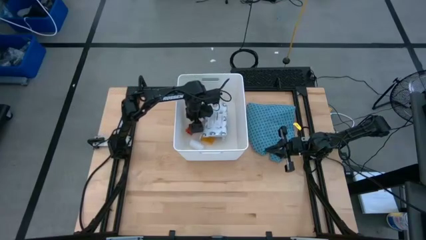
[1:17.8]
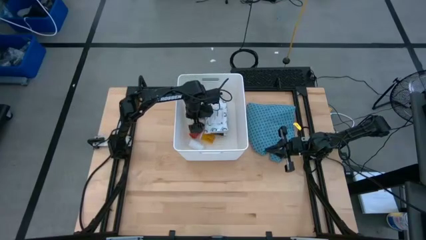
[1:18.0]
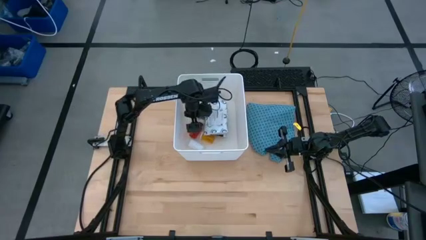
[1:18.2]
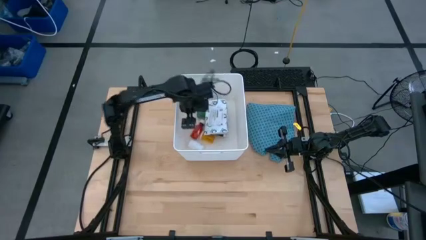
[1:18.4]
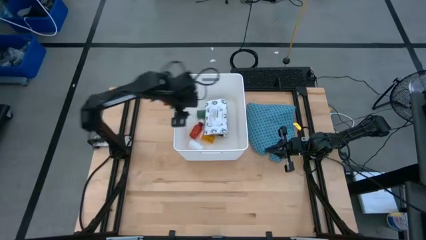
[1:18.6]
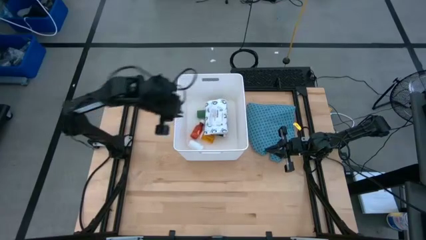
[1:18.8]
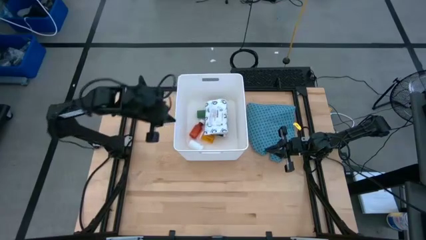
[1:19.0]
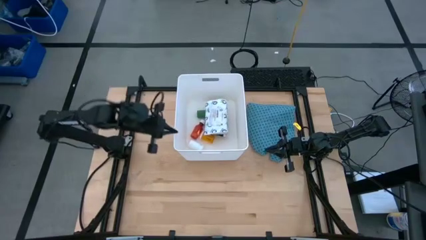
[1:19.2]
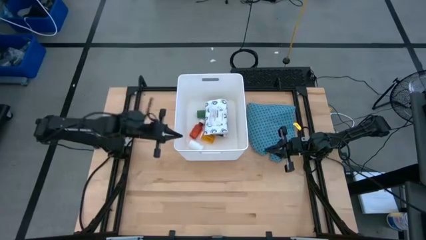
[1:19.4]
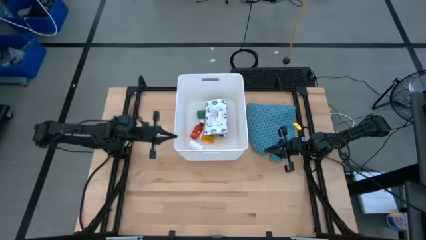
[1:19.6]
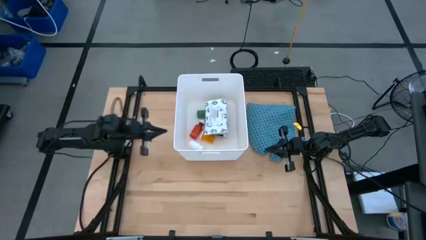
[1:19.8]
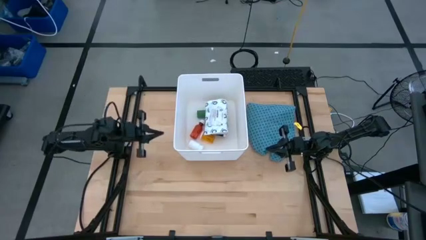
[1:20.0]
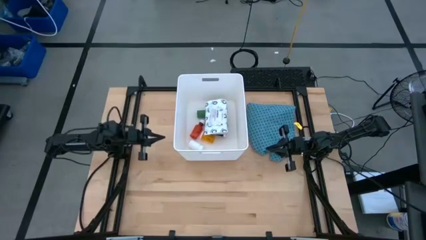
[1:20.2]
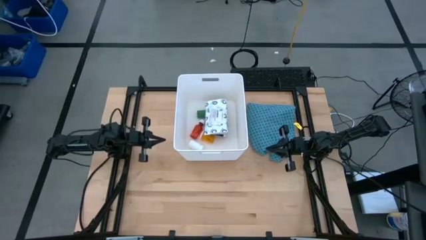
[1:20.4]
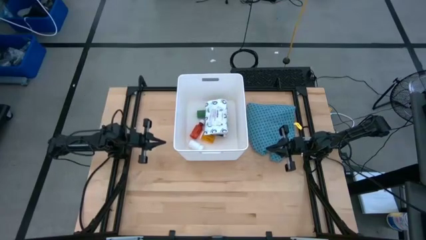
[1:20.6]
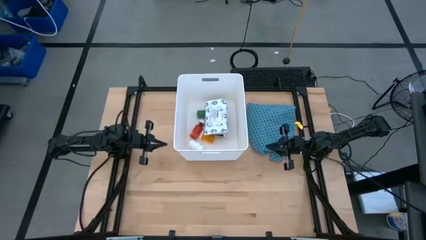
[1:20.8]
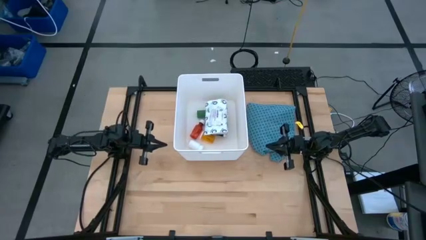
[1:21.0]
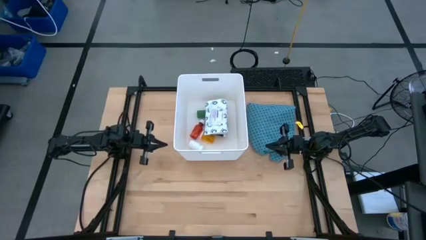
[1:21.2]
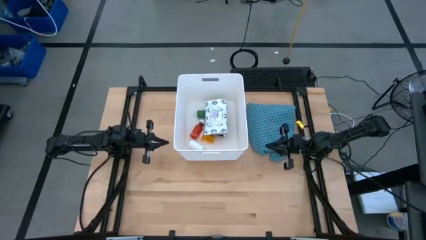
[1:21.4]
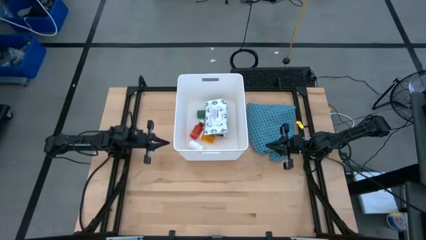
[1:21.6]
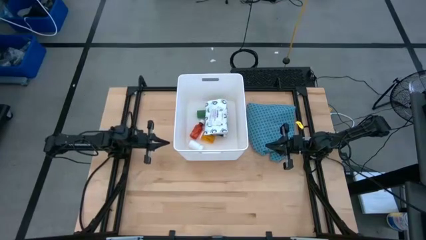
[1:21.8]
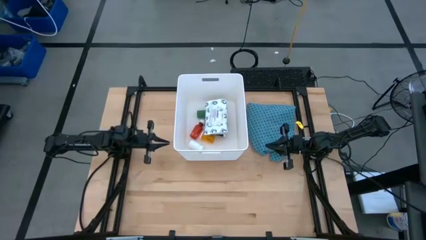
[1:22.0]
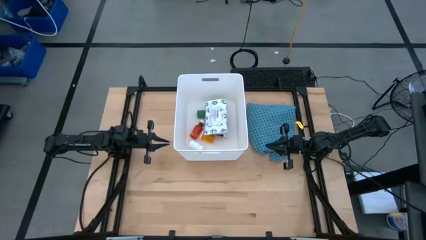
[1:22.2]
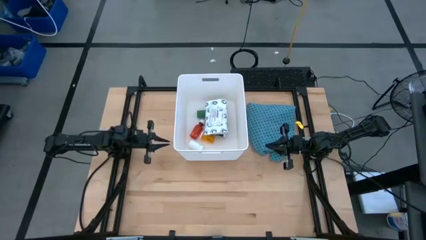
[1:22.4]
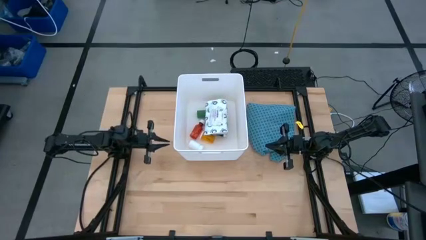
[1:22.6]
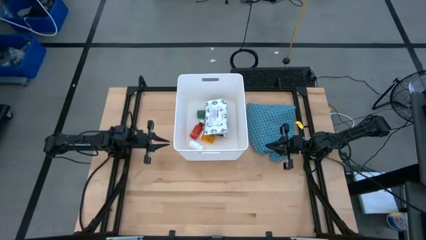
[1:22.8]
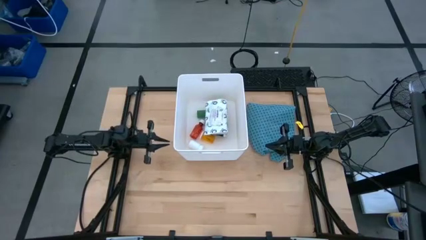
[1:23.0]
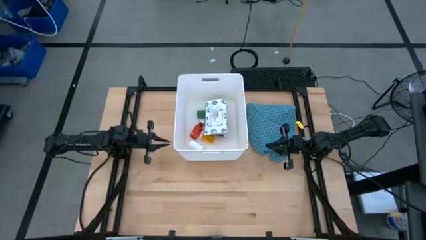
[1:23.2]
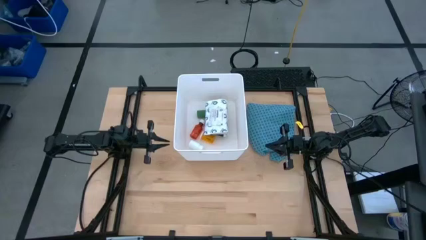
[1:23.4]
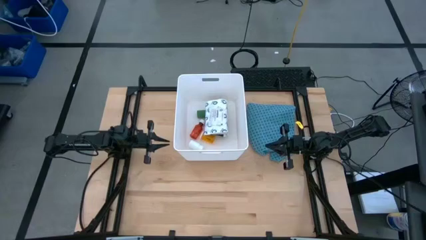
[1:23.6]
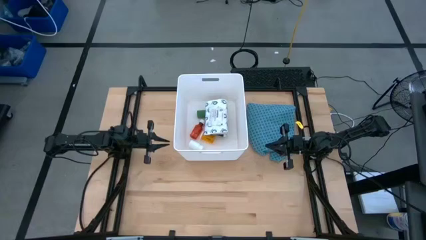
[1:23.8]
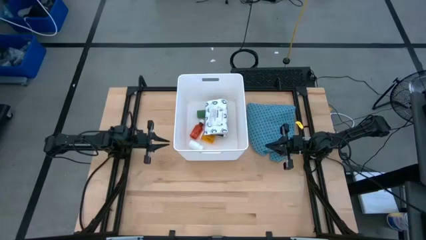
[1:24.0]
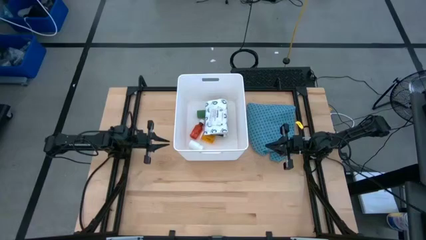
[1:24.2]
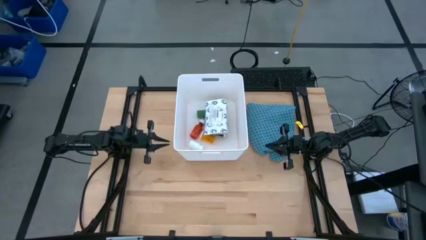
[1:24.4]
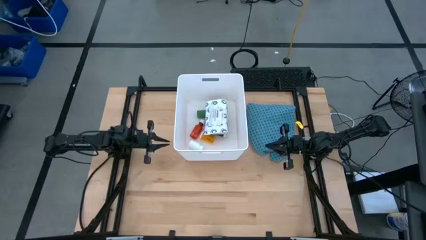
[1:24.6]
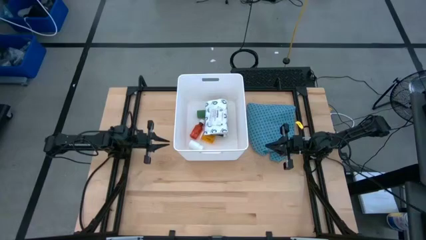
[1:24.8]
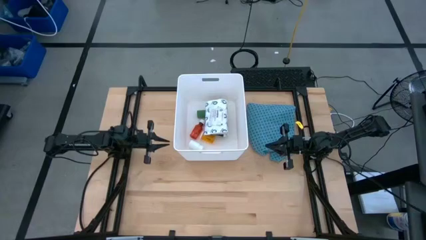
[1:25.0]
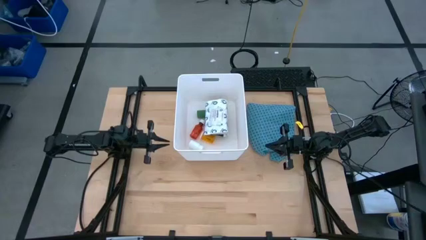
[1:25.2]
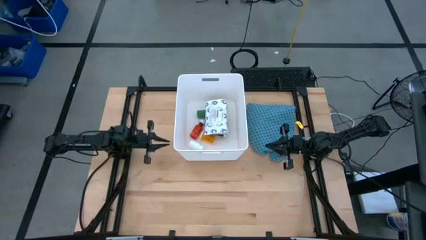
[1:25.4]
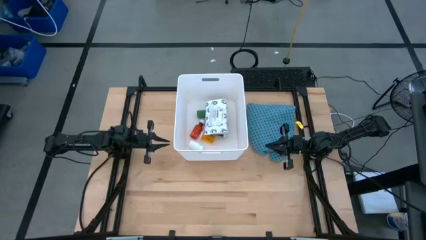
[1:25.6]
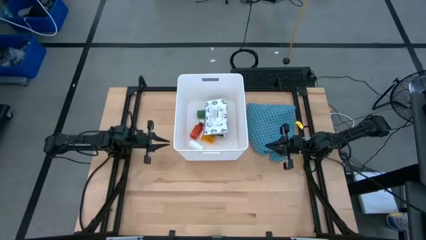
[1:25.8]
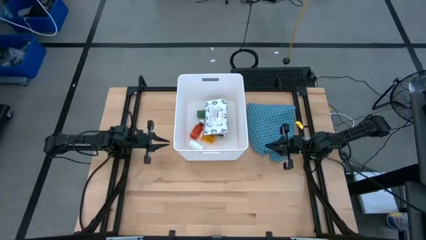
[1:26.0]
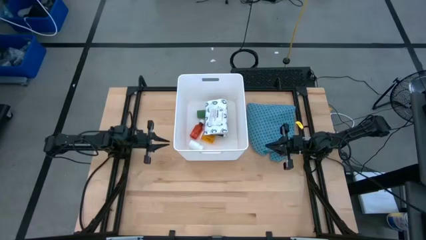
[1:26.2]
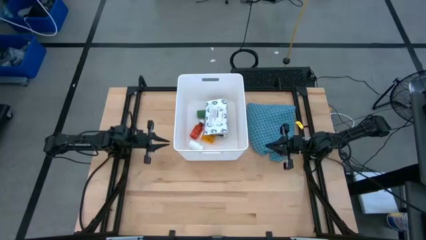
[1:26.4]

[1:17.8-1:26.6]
Task: Pick & place medical supplies in basket/bin
Return to Home Position

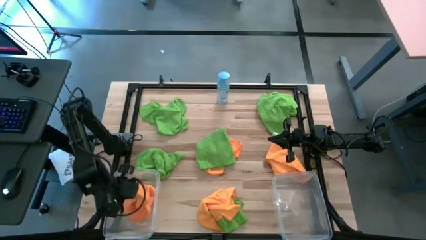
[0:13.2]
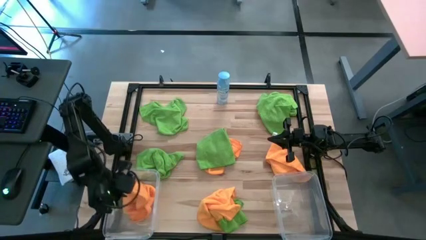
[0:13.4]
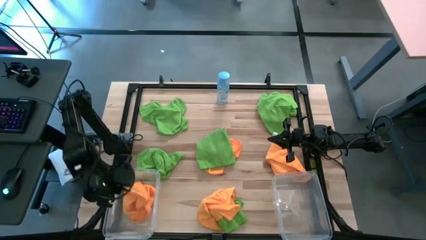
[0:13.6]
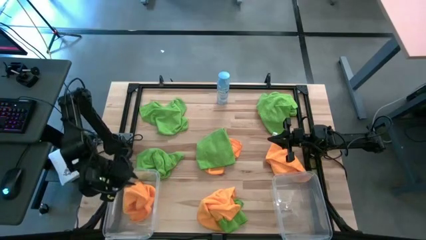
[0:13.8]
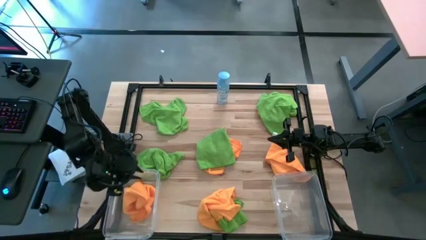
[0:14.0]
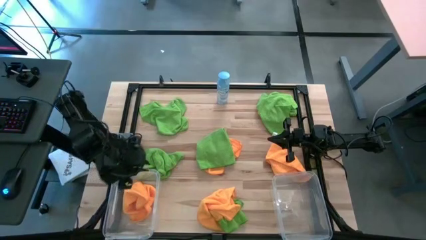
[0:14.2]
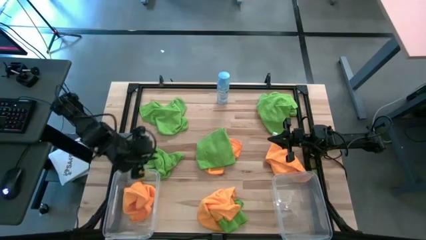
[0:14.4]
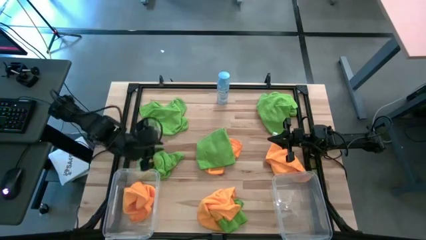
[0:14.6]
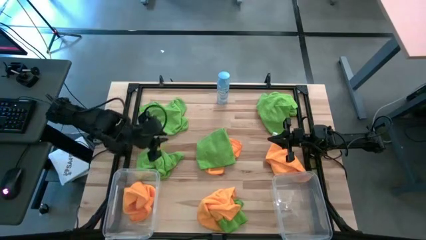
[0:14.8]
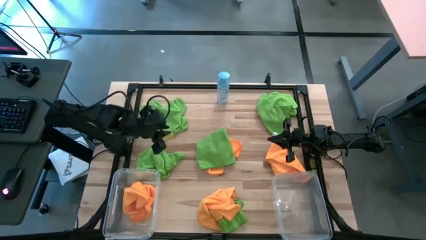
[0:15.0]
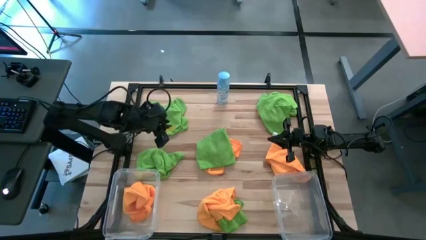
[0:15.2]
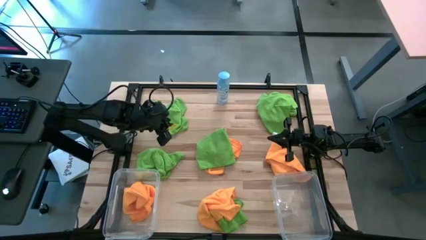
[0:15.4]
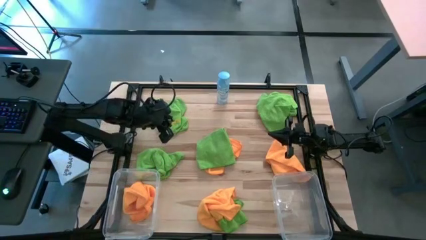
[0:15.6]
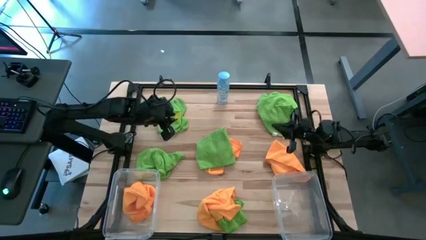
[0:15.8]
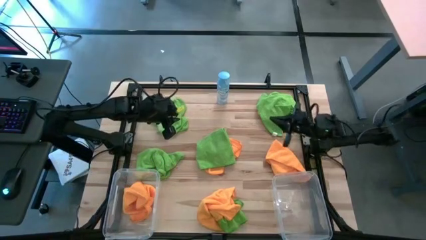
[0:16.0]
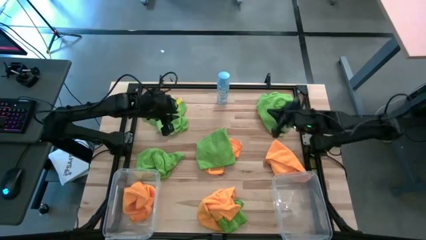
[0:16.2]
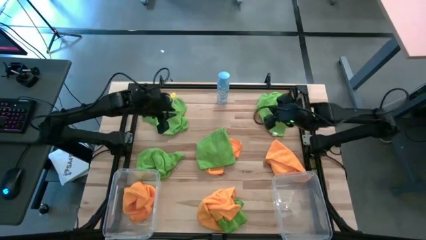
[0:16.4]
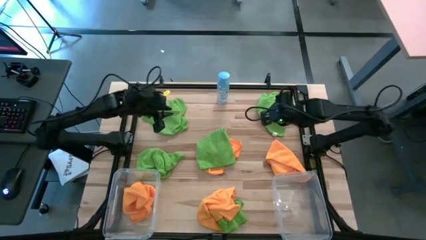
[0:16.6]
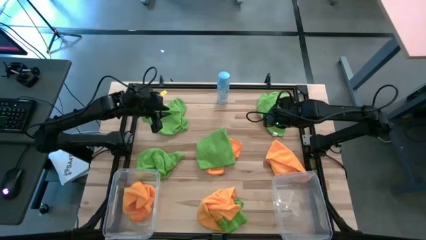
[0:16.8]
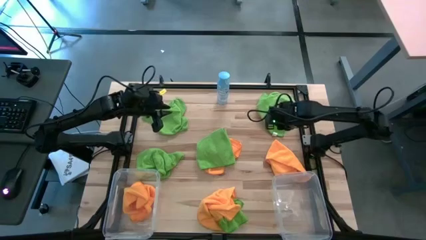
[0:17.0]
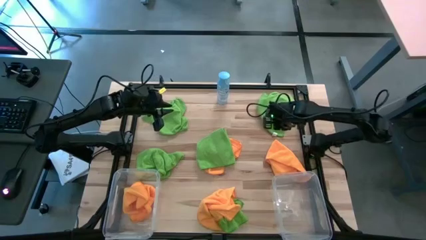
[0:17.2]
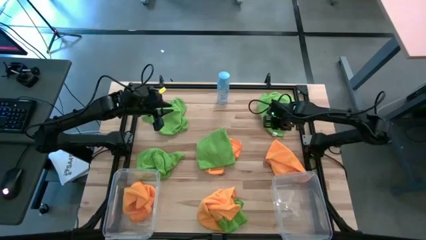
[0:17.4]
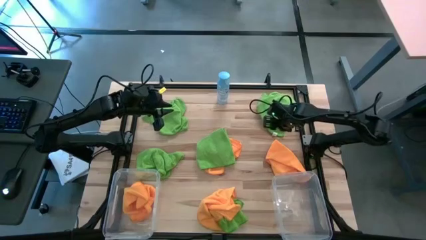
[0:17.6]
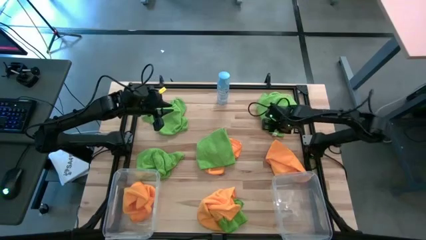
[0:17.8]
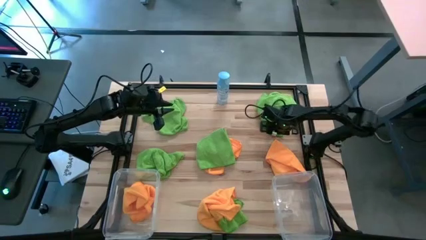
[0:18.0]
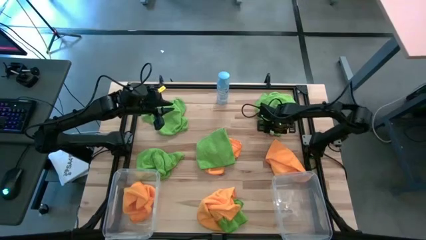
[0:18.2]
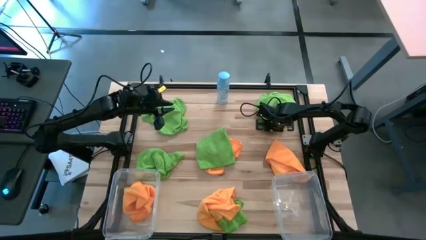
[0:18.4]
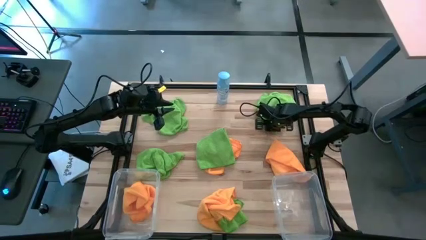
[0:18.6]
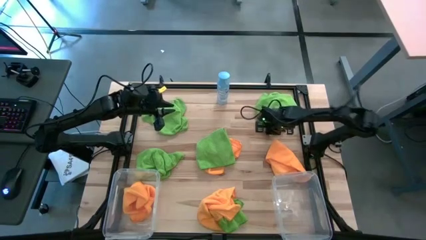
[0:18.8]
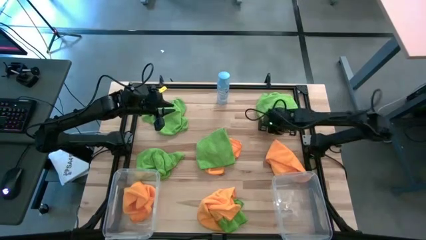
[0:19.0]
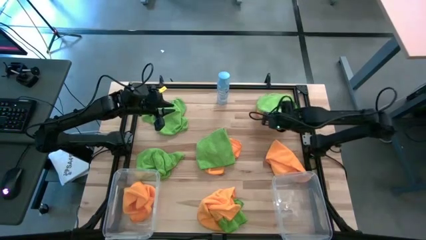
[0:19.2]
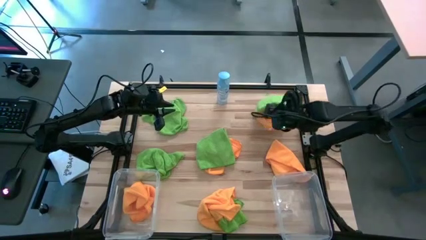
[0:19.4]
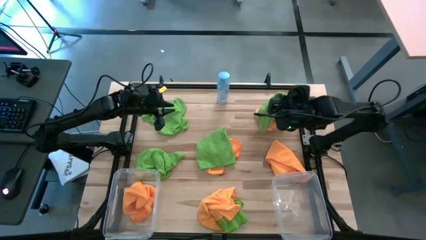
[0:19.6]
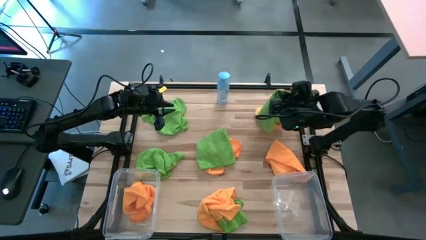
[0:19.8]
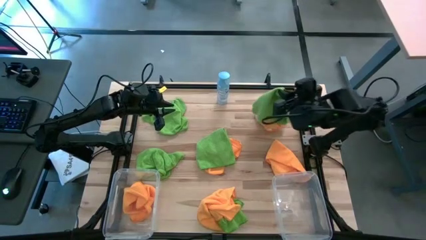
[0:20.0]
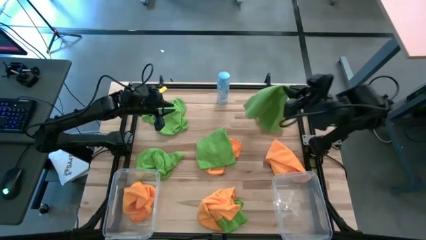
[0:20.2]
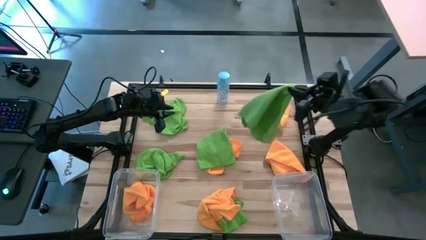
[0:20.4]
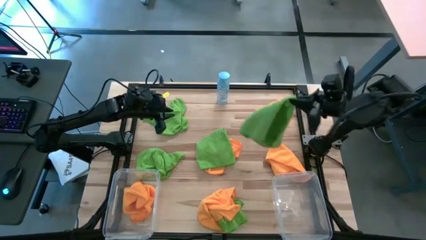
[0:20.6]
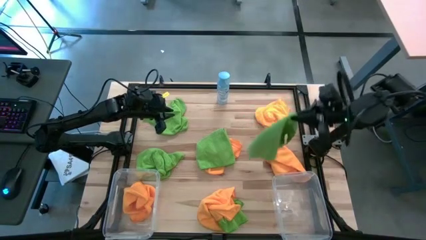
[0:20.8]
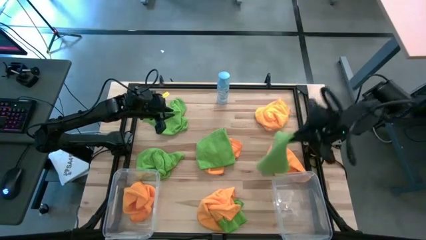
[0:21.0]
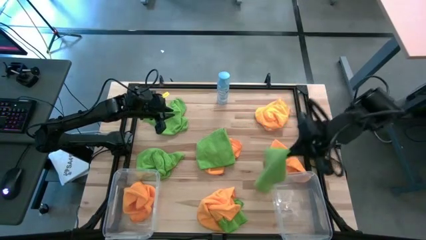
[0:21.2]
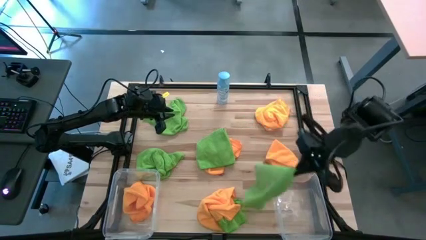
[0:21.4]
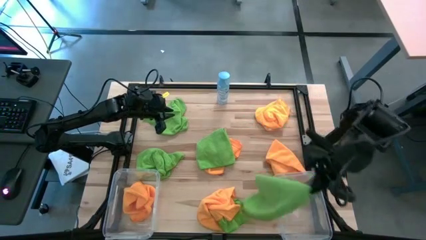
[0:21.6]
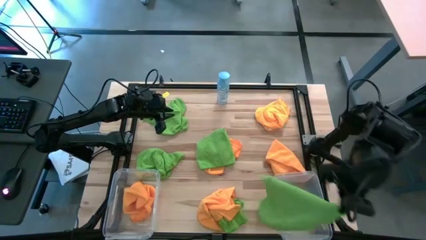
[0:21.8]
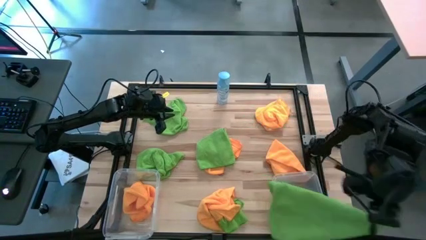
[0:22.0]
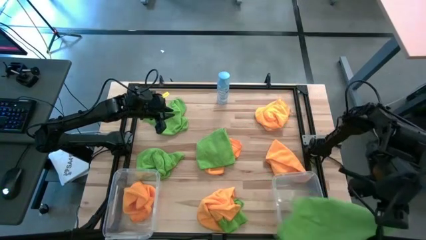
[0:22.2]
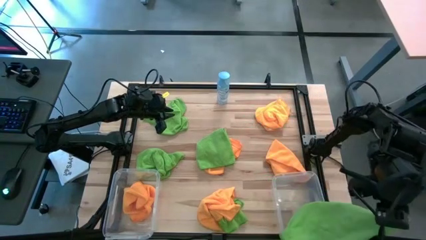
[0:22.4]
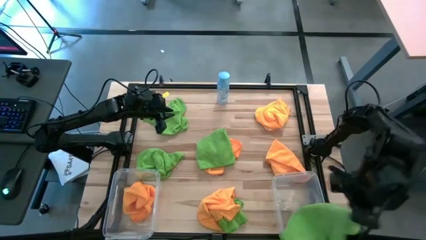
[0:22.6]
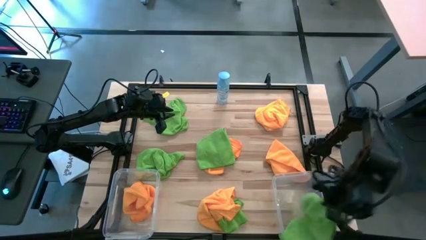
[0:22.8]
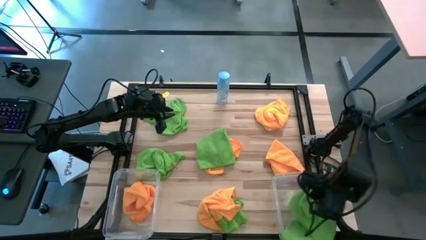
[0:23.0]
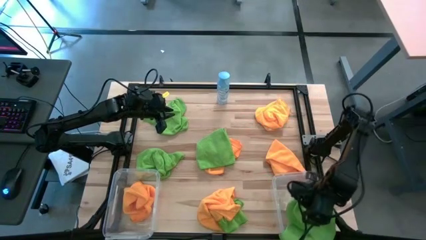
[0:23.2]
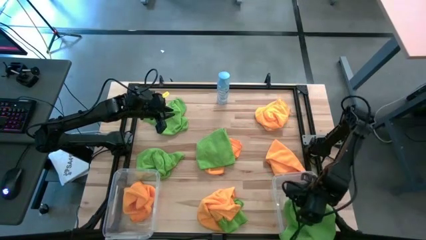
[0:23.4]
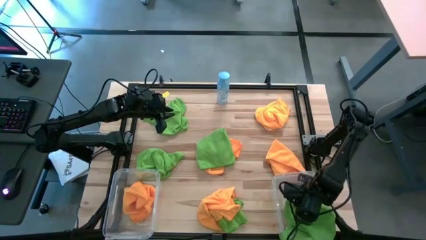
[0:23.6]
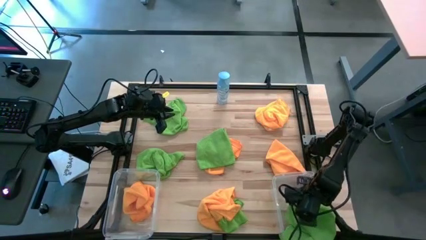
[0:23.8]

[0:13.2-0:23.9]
Task: Sort microfiber towel by color & place in baskets
Put the green microfiber cloth into the right transparent bin
